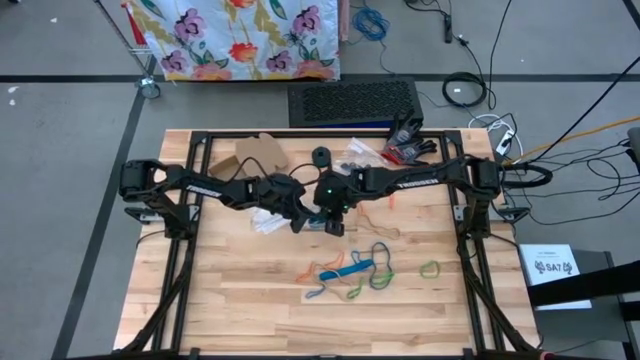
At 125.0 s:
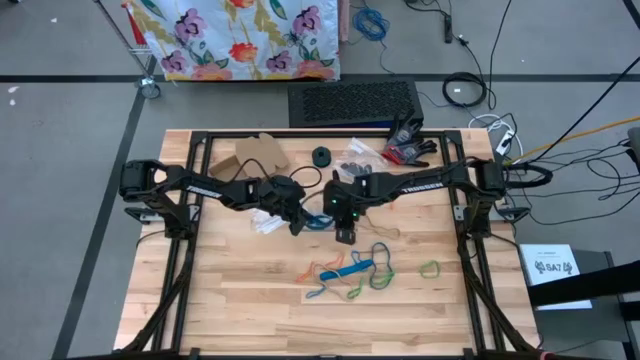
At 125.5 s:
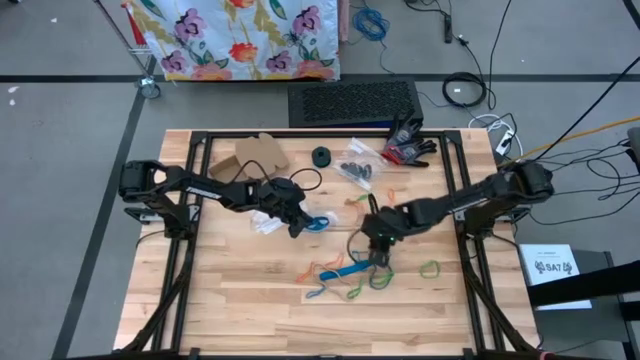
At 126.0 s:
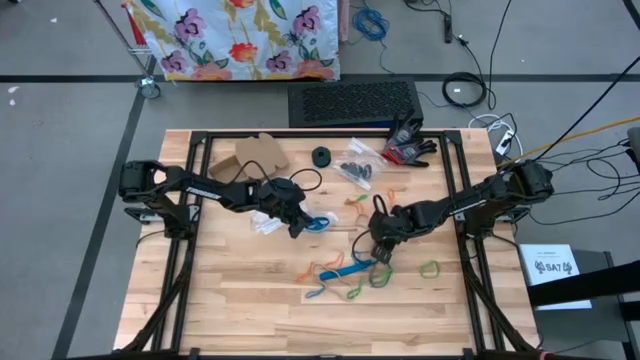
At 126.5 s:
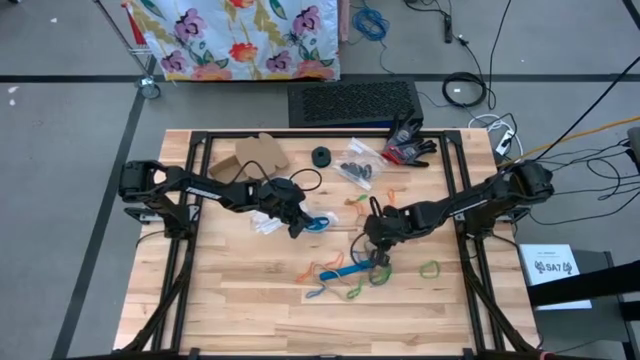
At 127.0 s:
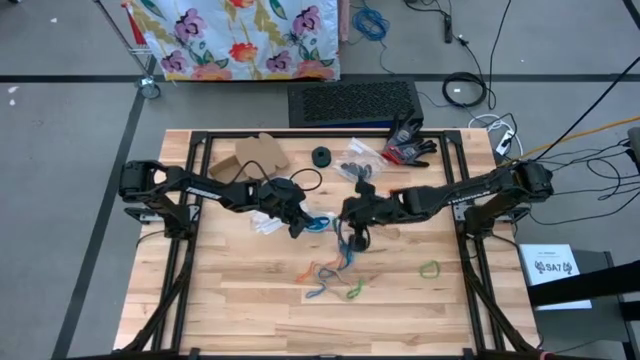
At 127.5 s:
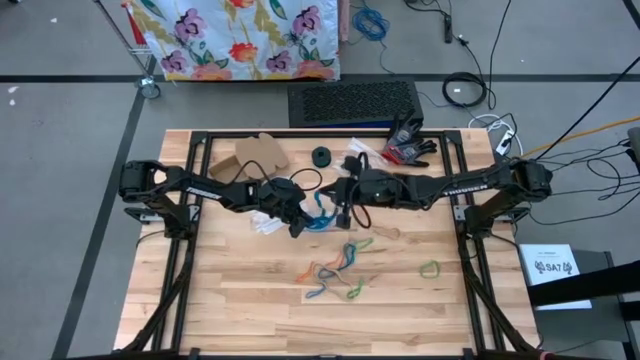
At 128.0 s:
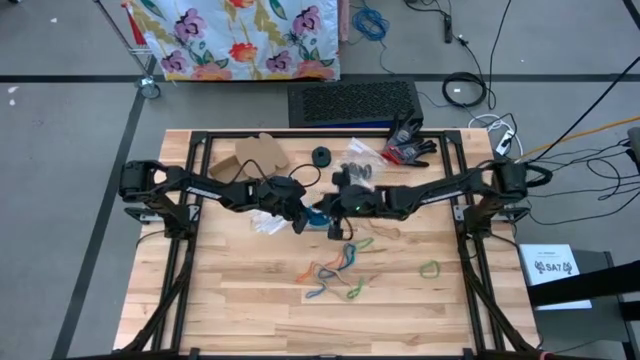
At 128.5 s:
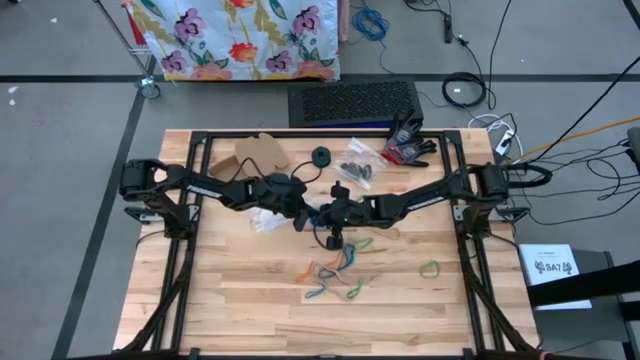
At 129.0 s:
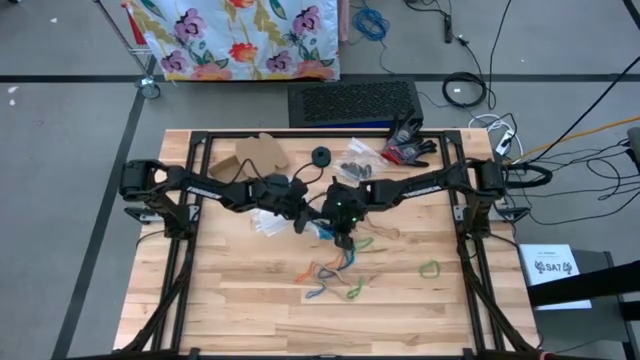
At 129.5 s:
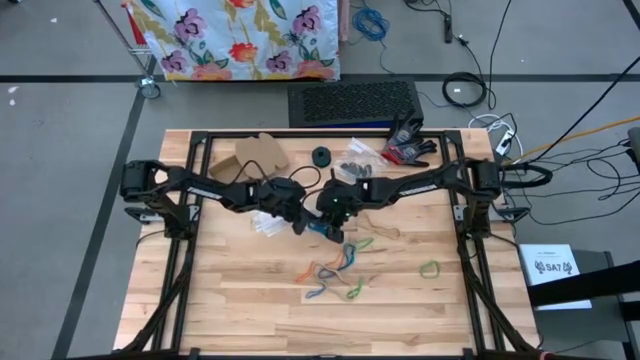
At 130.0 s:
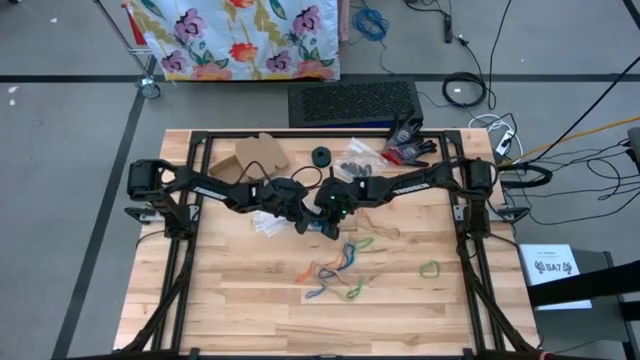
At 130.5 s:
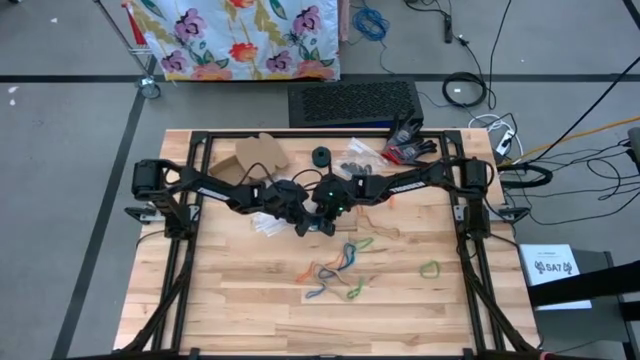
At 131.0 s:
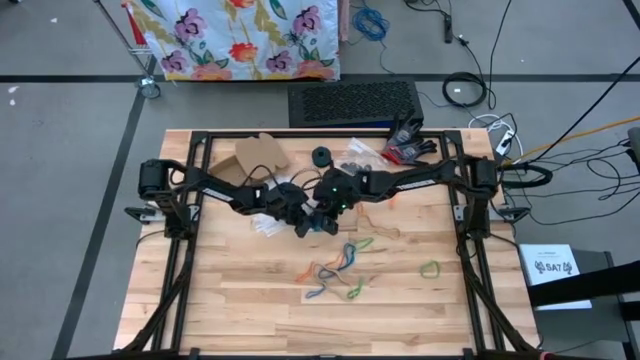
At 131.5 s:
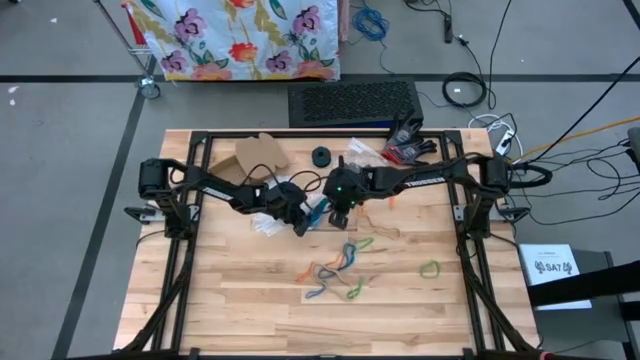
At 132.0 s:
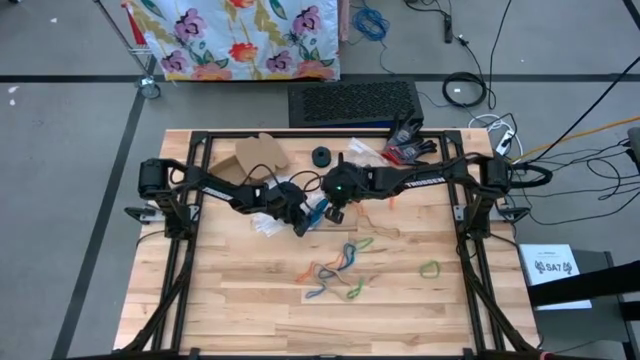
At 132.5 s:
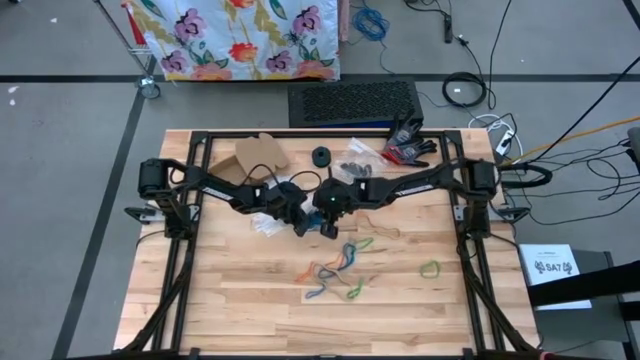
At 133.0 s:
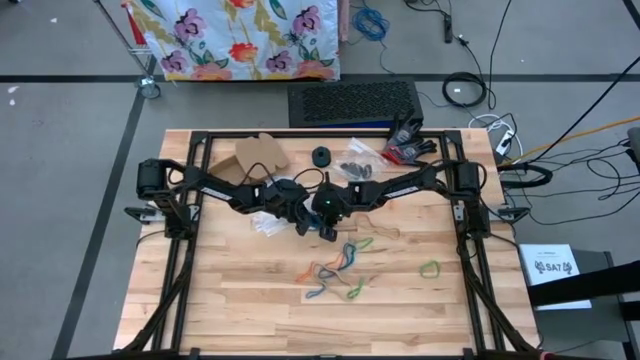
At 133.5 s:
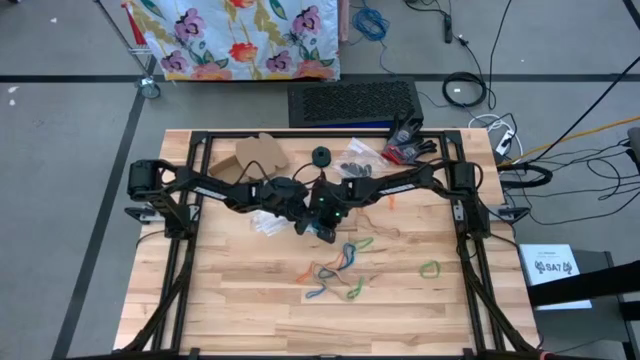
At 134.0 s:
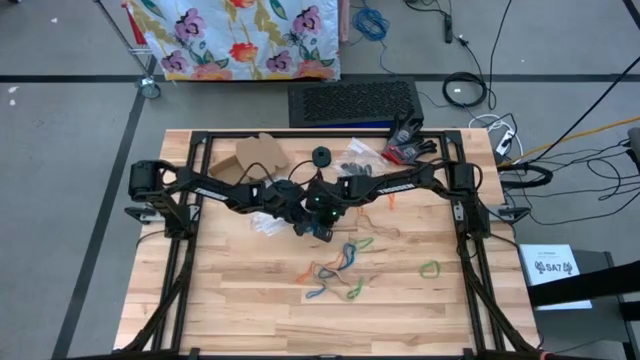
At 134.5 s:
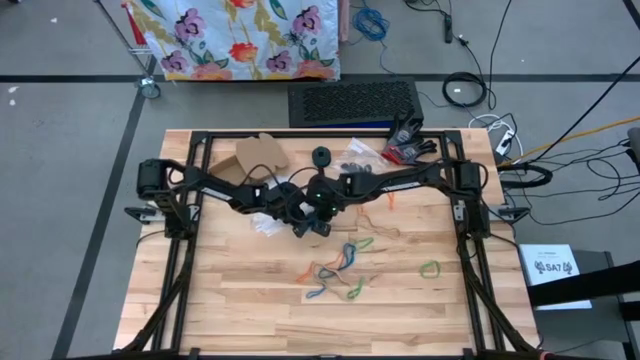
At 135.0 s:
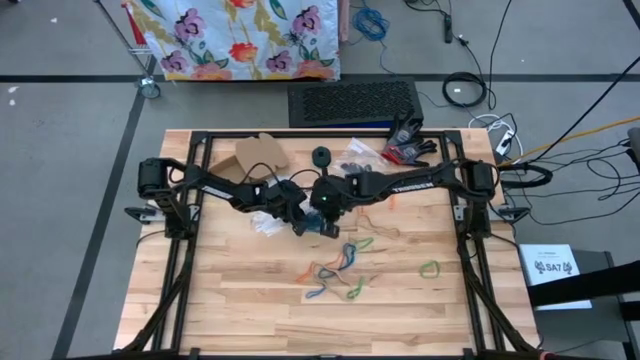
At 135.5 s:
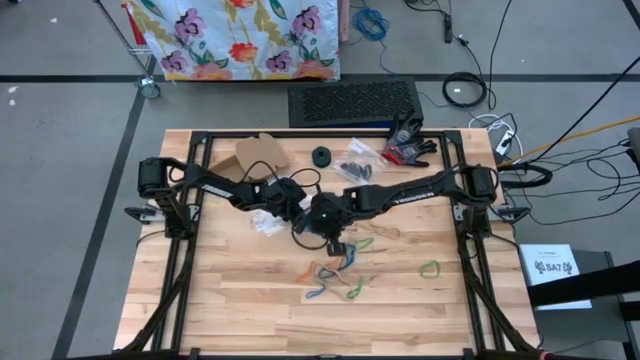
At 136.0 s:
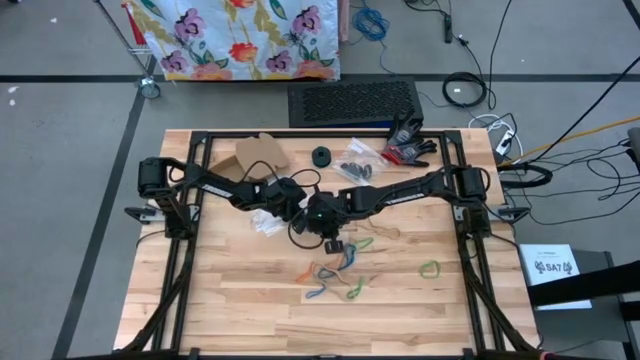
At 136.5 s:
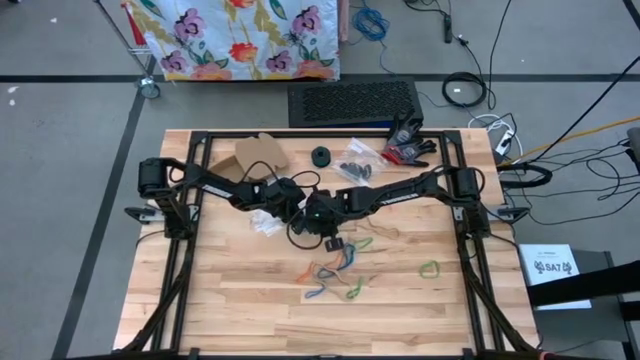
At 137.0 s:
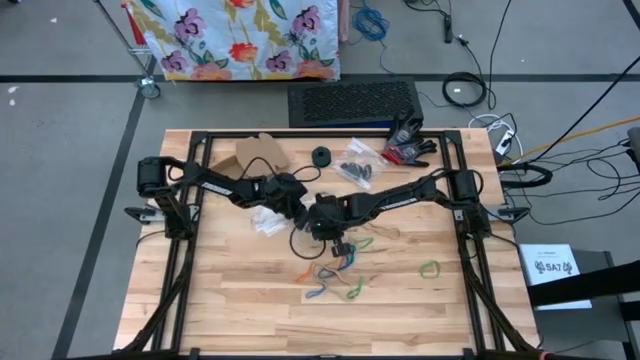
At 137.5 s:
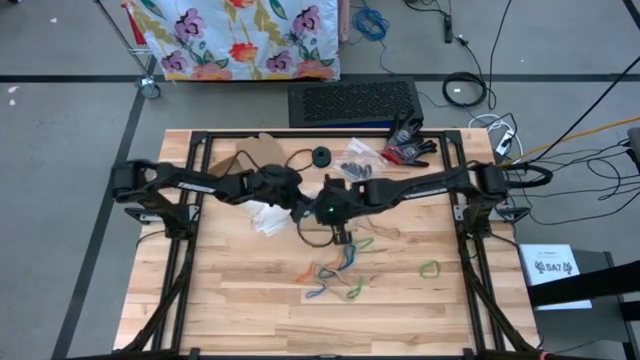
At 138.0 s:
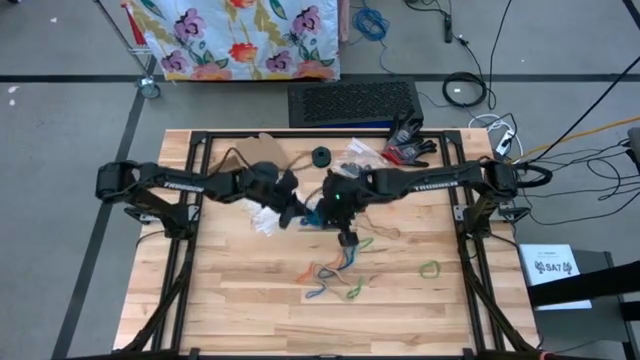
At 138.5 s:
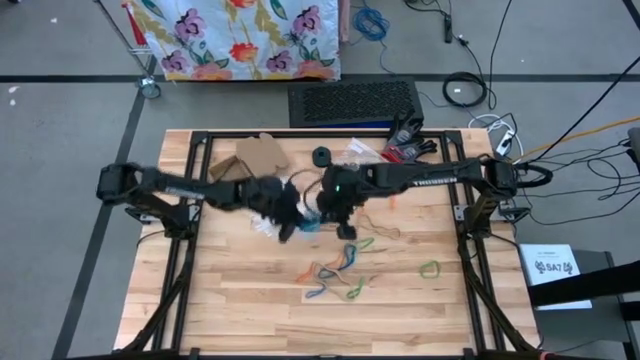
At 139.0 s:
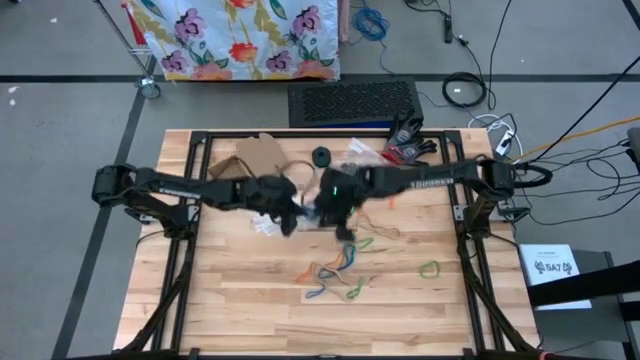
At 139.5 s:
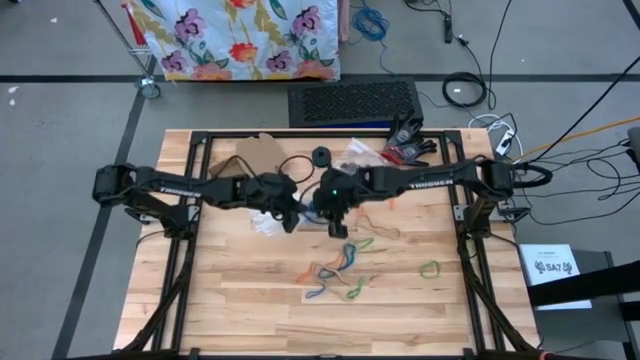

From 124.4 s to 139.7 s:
Task: Sort rubber bands
Put the blue rubber band into the transparent zip bag

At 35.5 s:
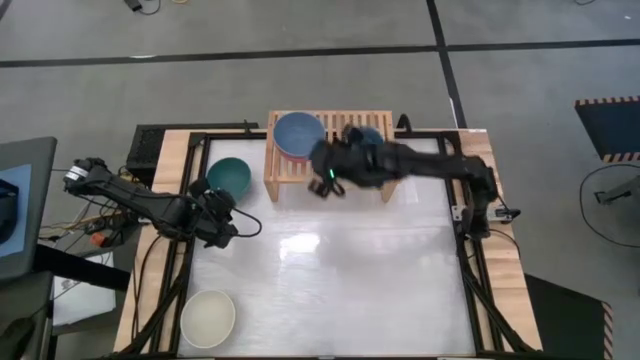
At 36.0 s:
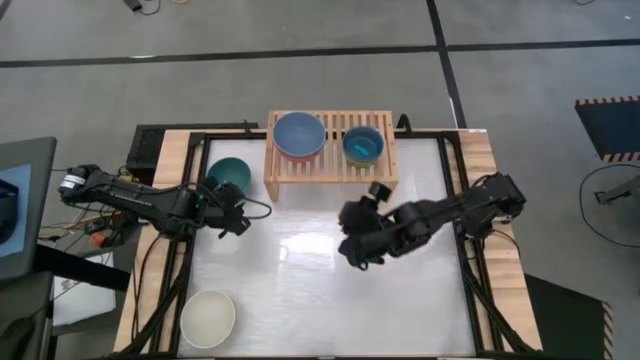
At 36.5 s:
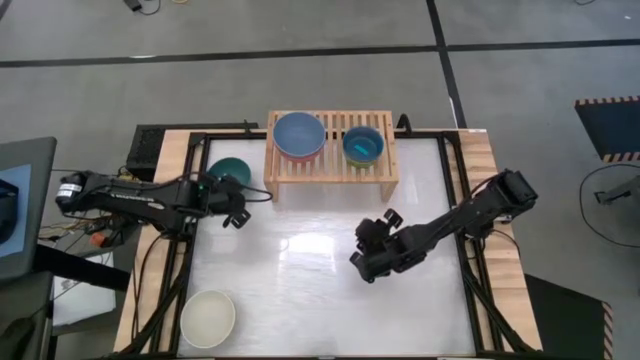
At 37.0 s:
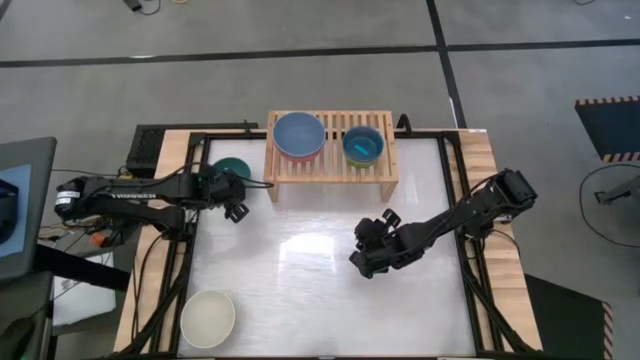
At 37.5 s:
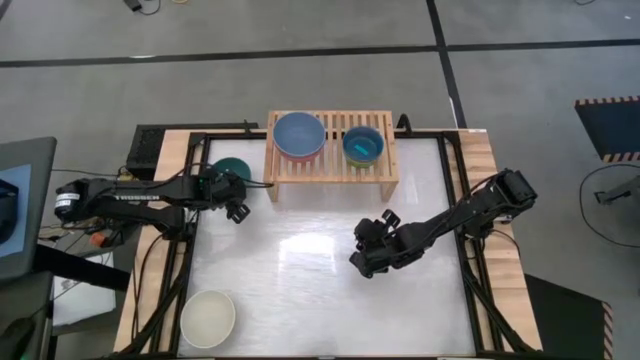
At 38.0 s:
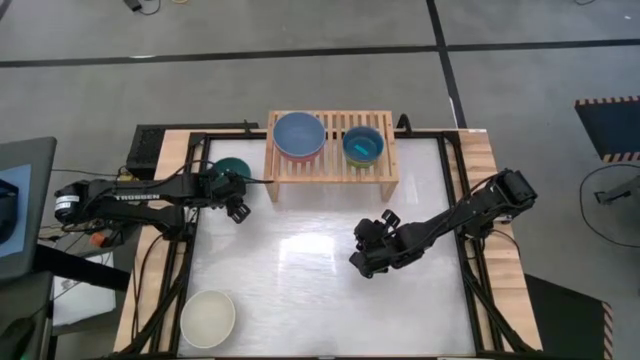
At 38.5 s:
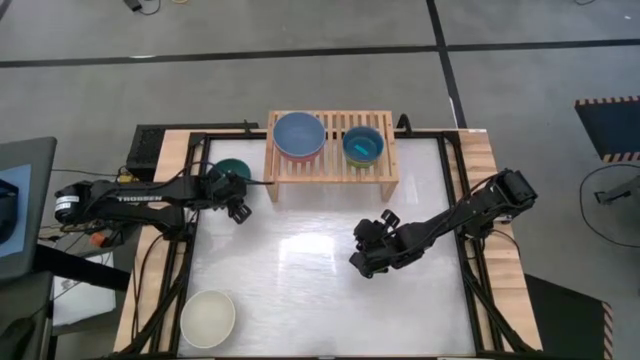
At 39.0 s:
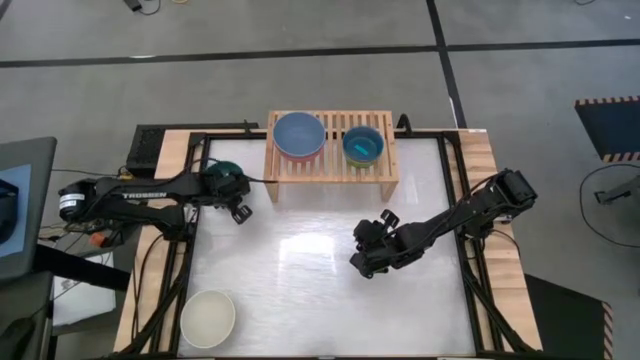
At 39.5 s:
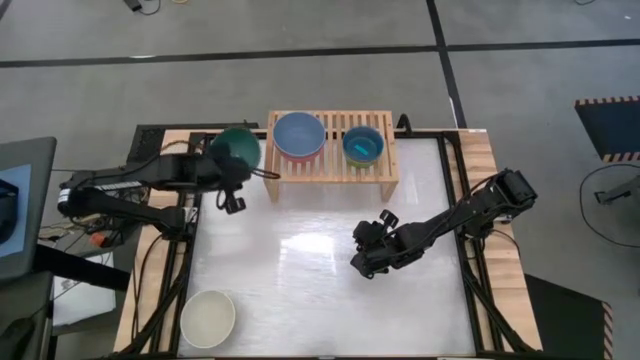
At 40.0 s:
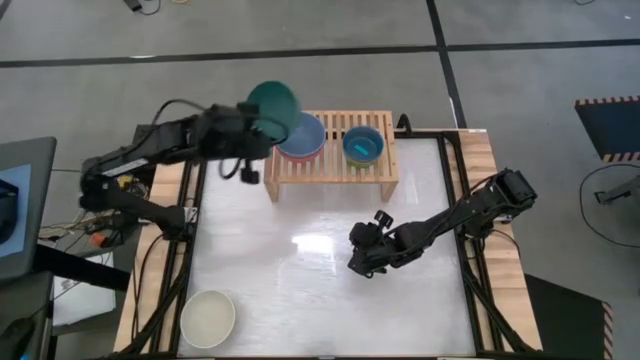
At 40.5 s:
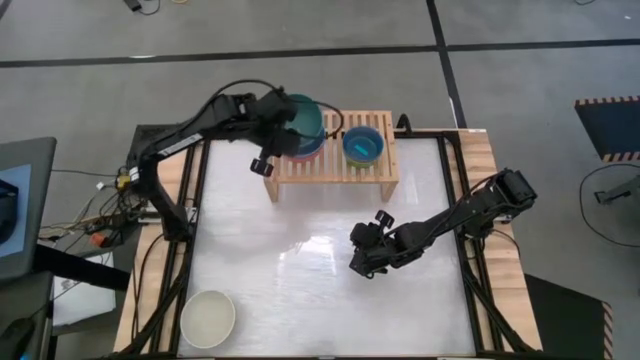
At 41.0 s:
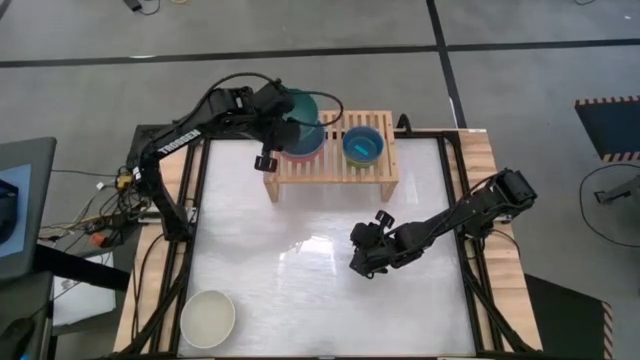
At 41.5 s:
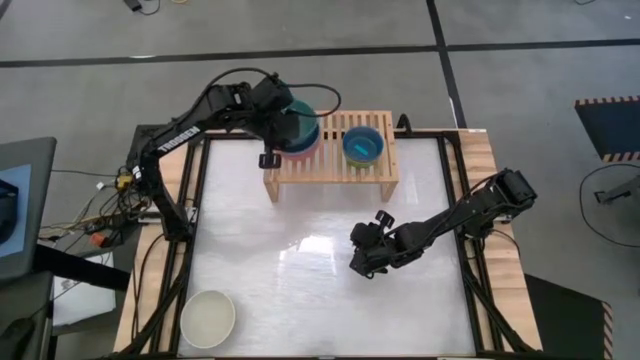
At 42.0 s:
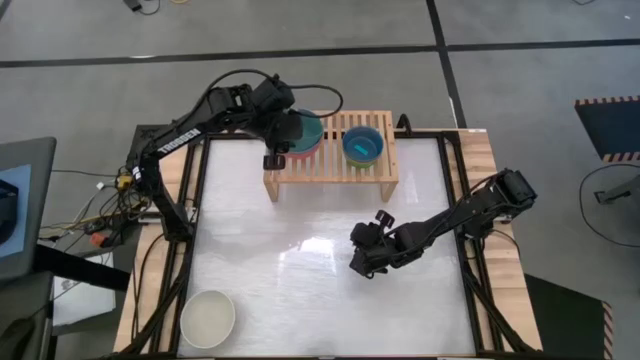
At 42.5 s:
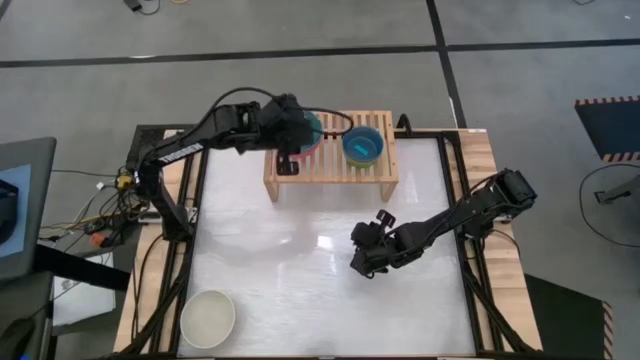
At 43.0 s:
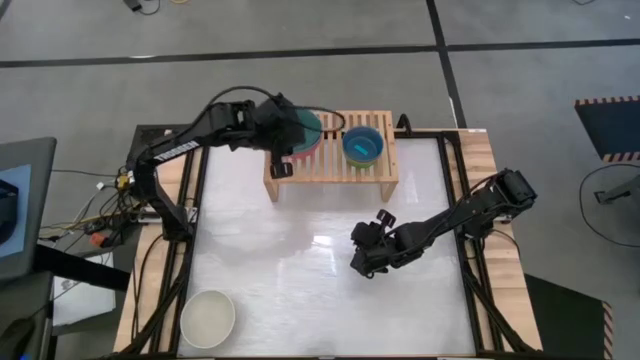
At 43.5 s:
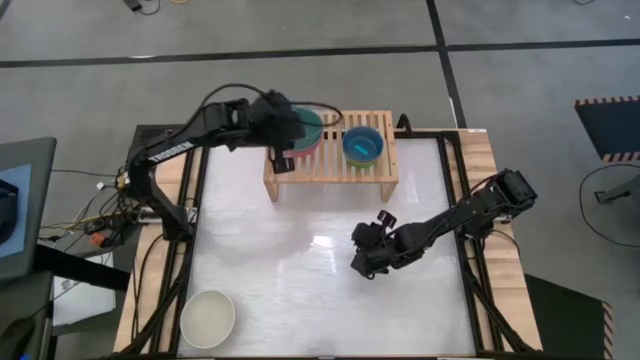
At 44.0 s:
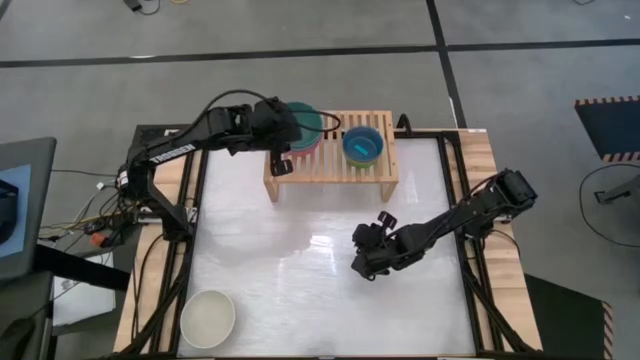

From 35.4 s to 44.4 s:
Task: Place and stack bowls onto a shelf
Stack the green bowl on top of the blue bowl on the shelf
